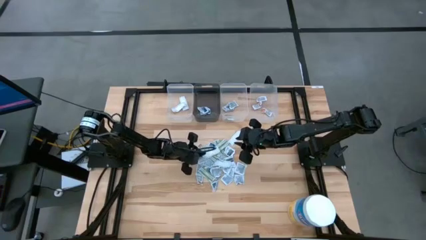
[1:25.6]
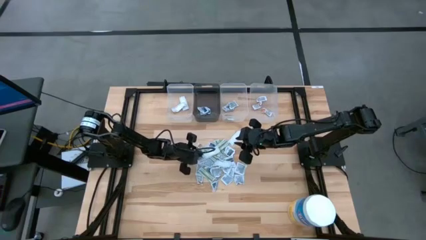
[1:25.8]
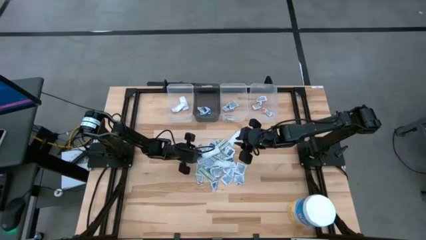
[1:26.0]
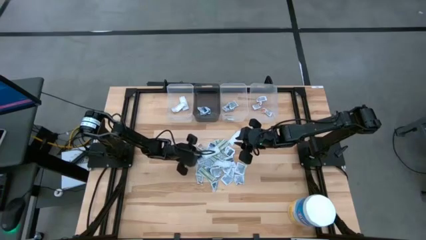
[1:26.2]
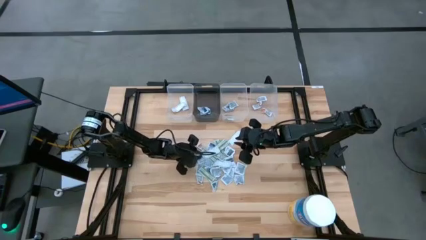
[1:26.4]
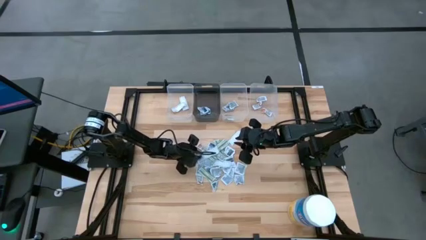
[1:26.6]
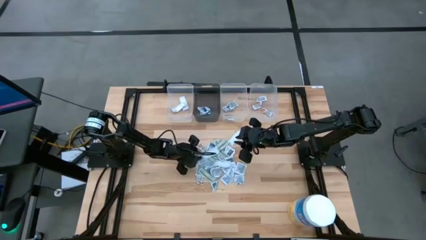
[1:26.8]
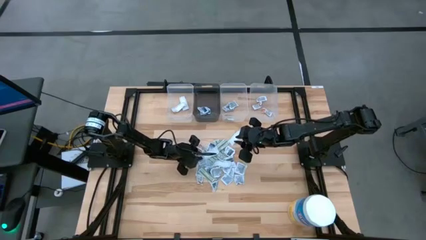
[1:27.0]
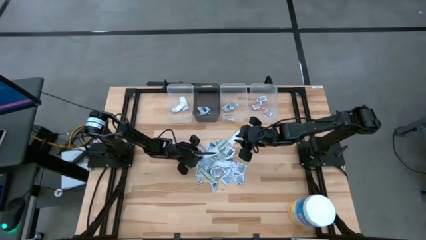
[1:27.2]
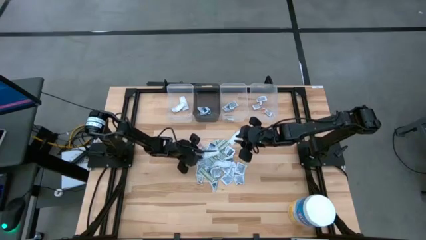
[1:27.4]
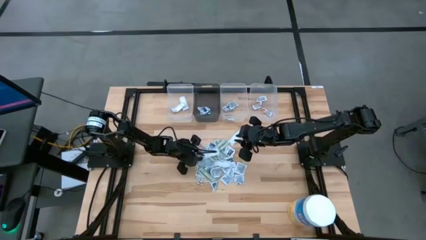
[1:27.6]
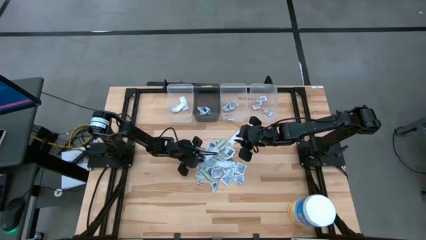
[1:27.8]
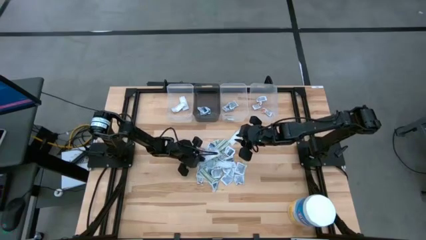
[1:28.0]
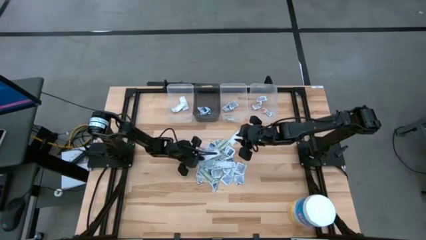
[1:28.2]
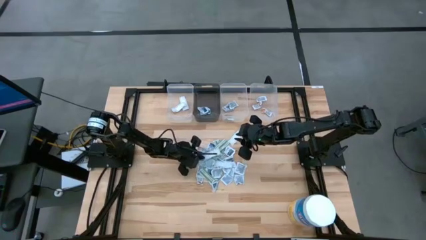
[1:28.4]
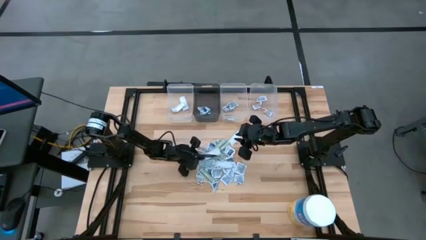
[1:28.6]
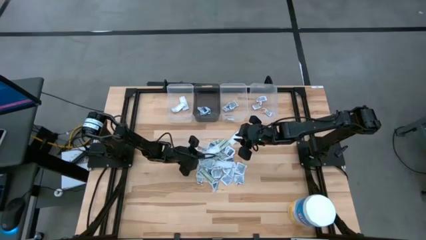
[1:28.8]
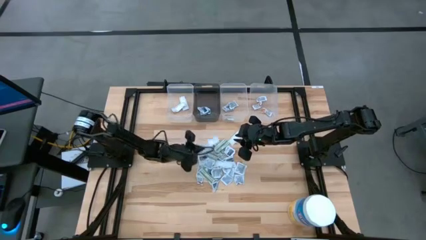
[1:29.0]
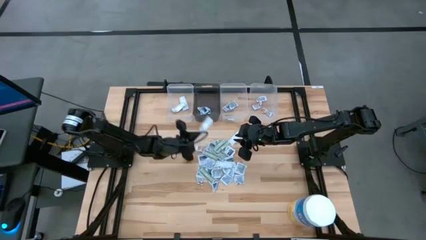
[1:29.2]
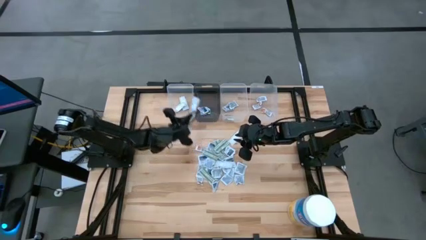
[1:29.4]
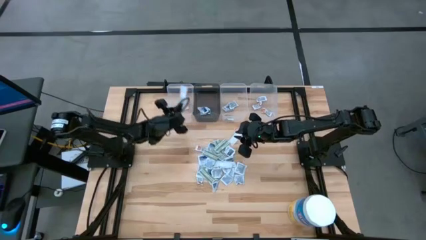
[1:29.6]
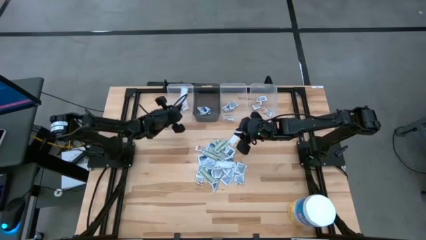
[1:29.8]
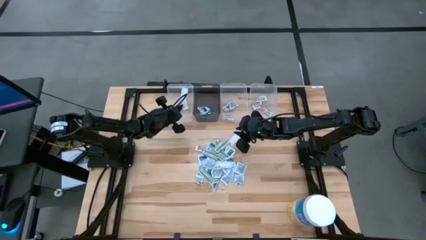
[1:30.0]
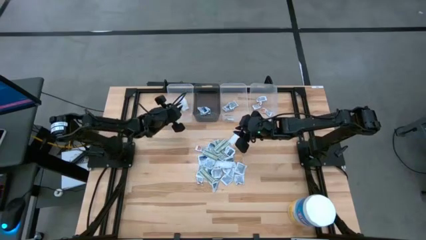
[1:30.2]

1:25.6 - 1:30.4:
Task: Pick & Place First Aid Supplies
Put the bandage into the left transparent bin

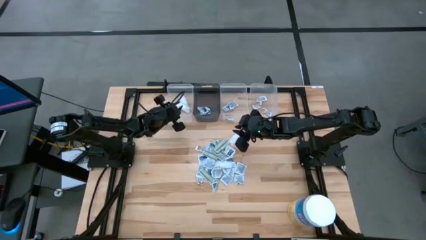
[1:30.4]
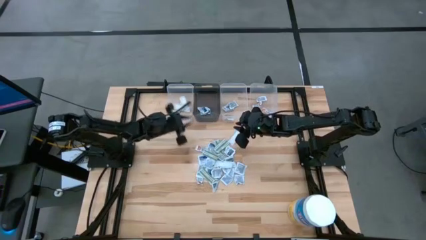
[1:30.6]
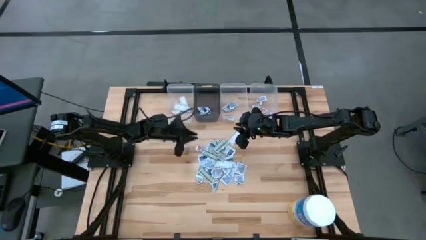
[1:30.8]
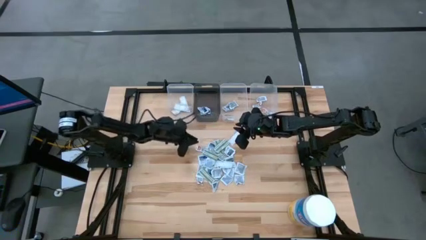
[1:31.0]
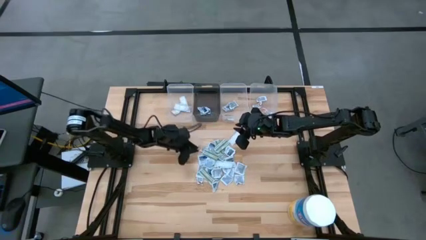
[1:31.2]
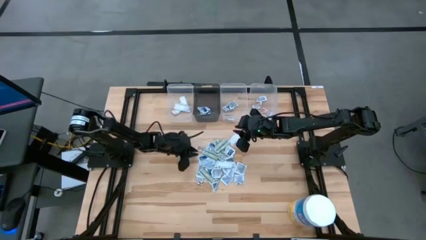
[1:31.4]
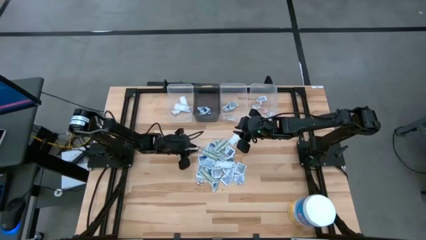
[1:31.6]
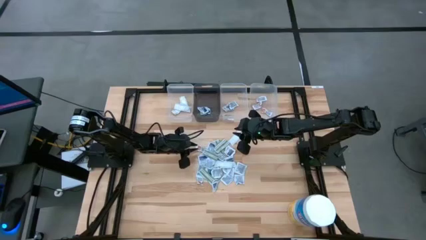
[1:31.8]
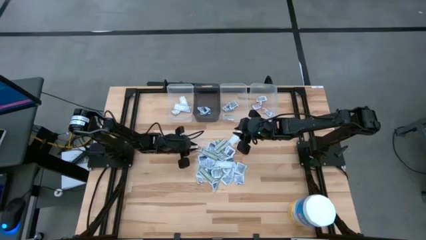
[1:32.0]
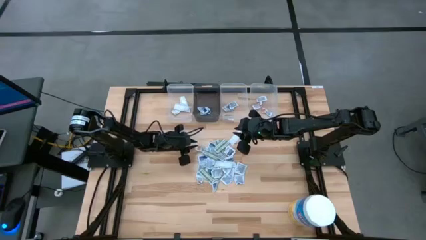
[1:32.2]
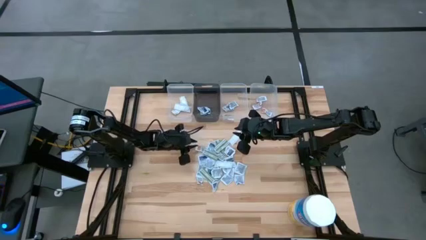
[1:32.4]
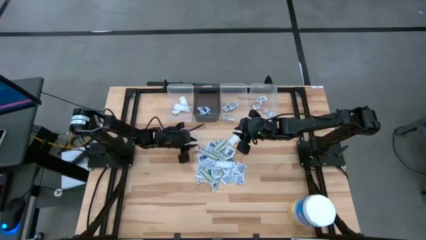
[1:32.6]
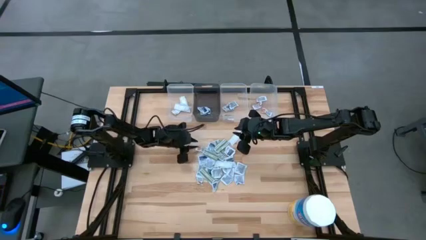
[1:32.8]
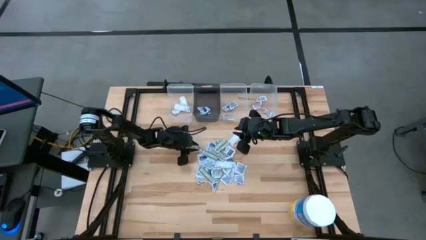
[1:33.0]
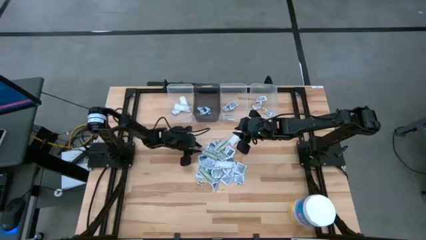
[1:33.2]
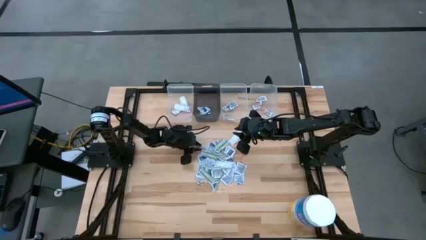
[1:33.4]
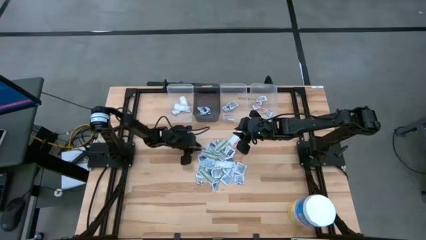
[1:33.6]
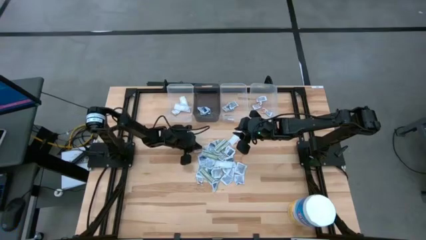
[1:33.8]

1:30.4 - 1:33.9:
Put the ointment pack into the right transparent bin

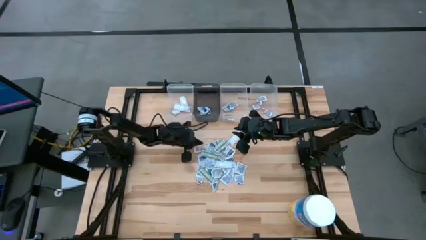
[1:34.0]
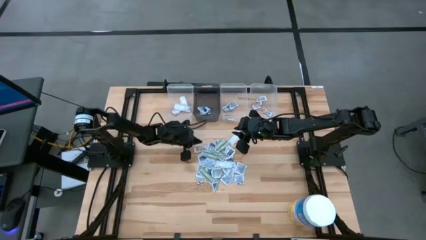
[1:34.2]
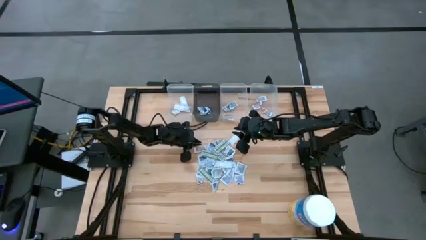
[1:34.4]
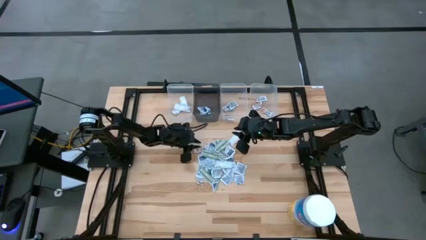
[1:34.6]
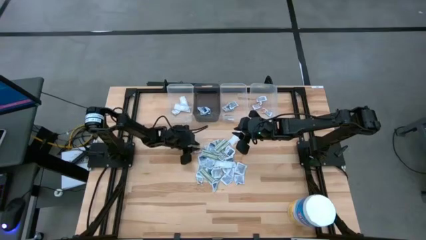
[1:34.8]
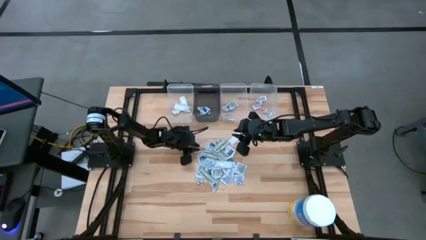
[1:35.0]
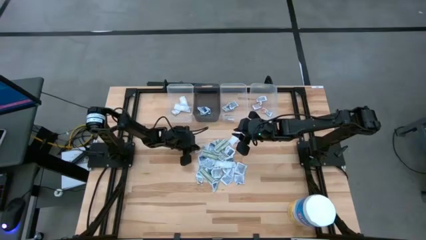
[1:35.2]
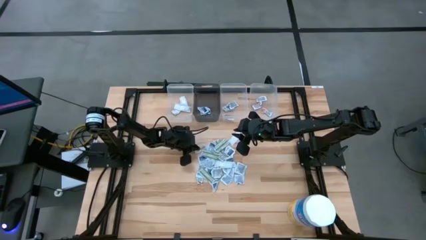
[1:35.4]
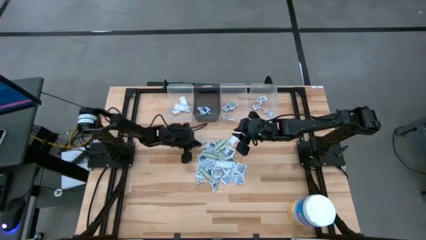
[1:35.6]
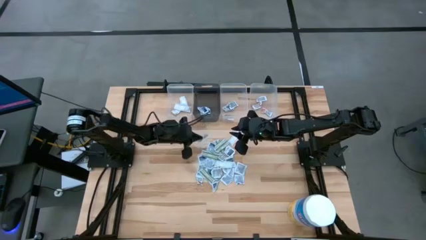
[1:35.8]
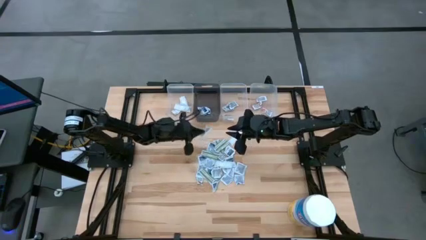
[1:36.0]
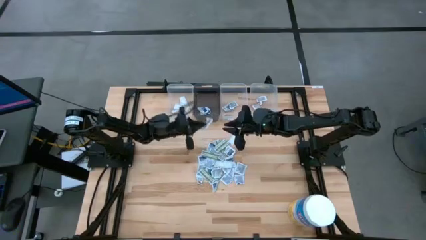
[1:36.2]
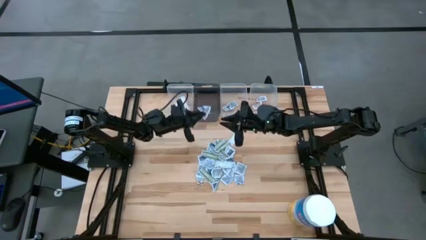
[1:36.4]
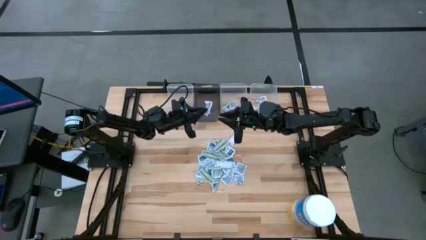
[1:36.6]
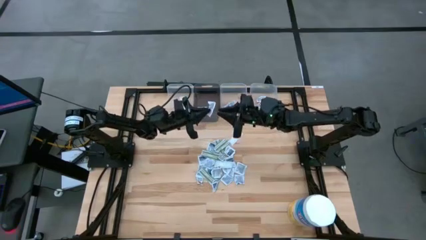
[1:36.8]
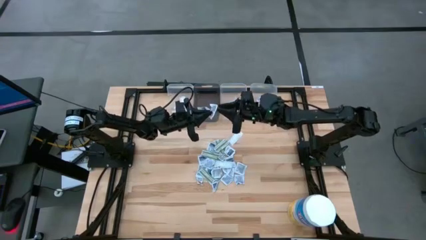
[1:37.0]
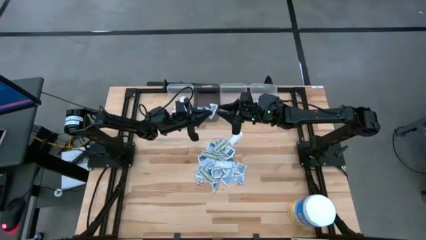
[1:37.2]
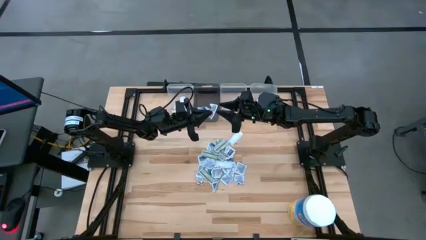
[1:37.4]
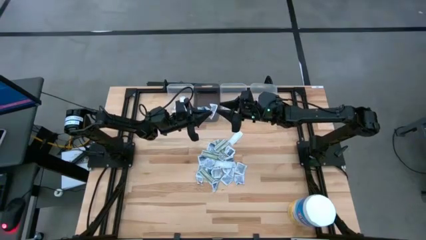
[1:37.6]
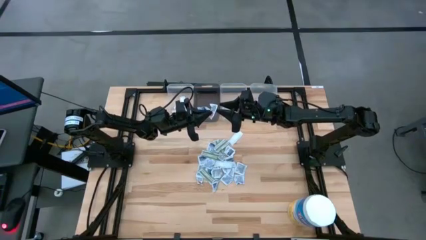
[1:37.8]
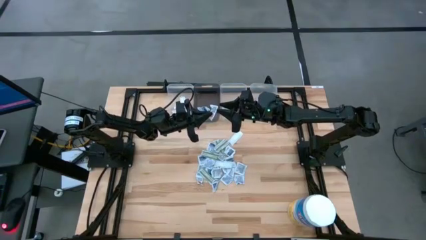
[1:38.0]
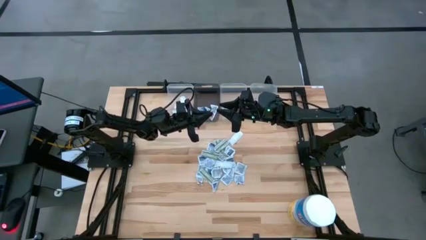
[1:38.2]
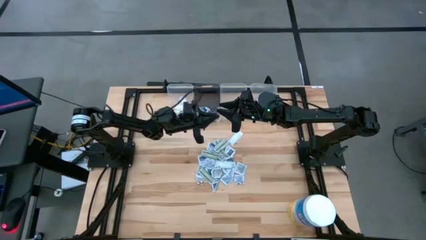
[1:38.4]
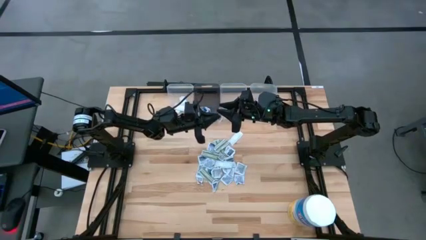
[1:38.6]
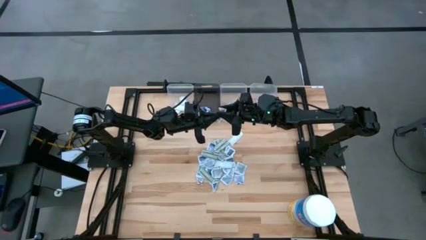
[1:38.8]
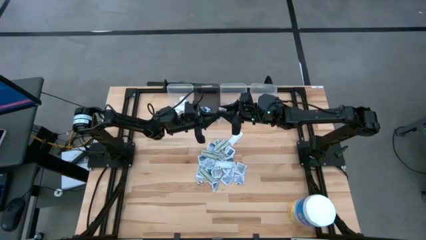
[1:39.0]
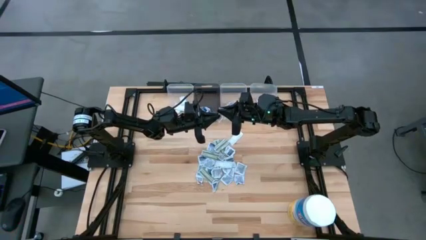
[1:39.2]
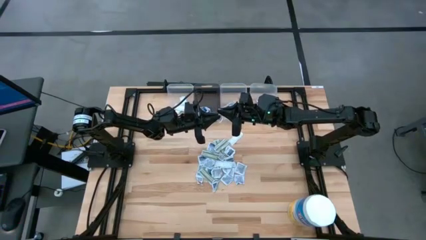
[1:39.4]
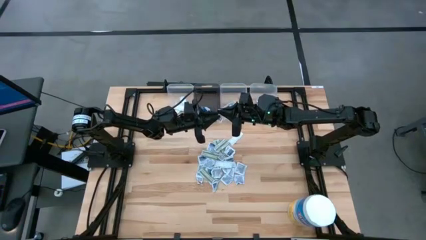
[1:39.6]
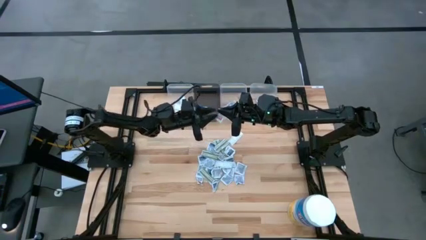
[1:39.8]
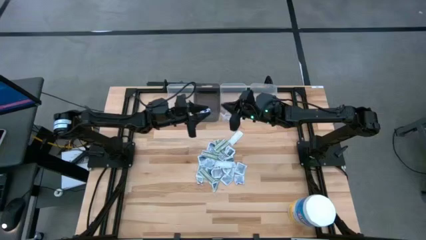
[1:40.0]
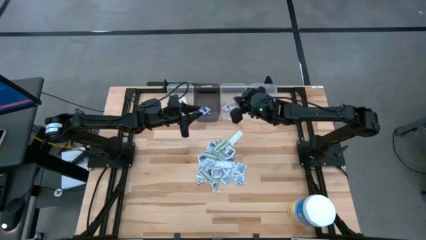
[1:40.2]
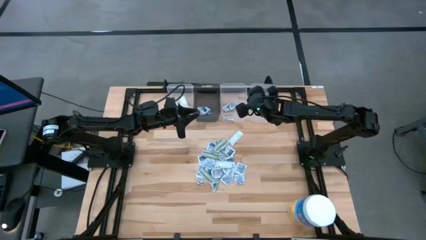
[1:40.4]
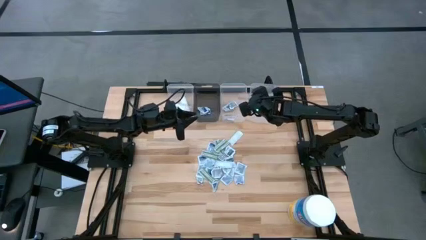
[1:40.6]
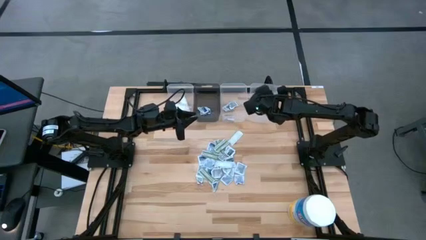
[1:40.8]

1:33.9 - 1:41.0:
Put the ointment pack into the right transparent bin
